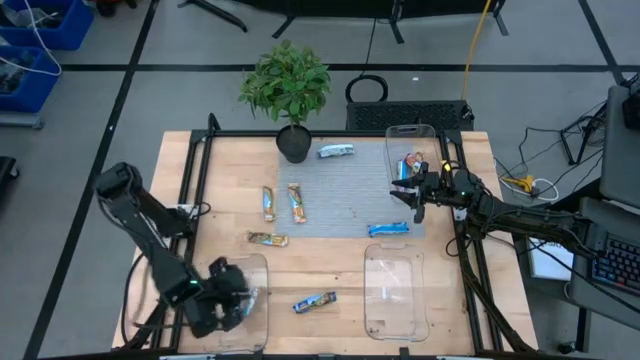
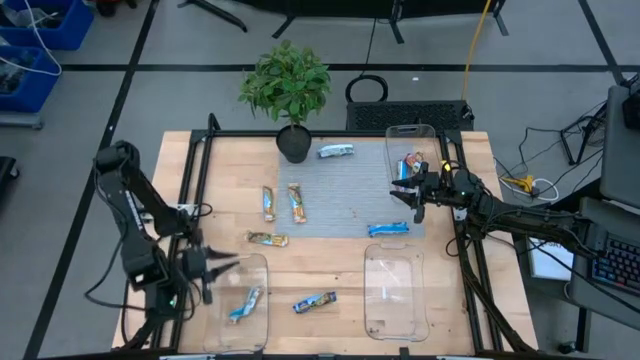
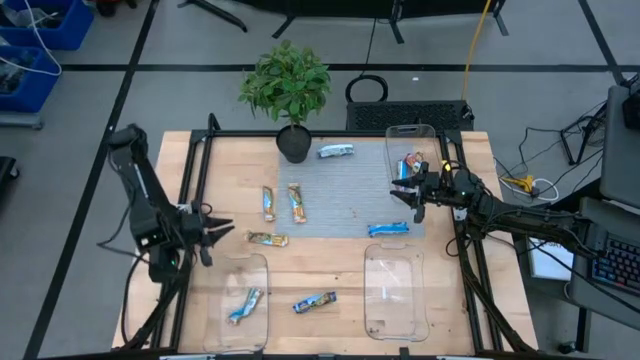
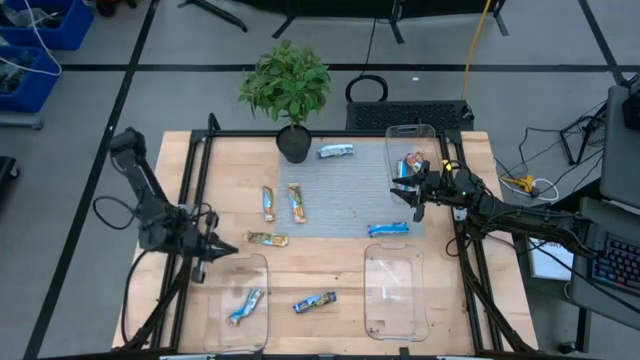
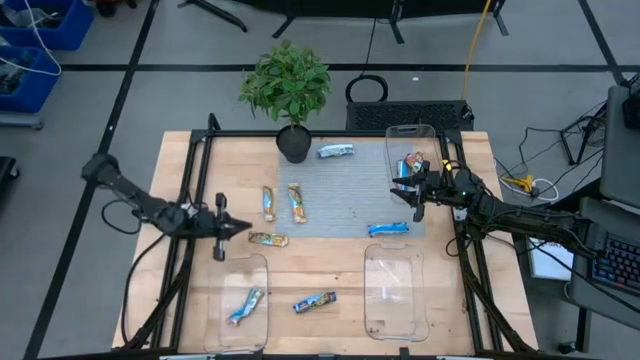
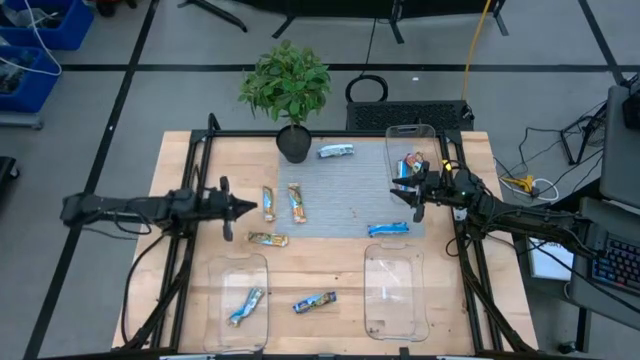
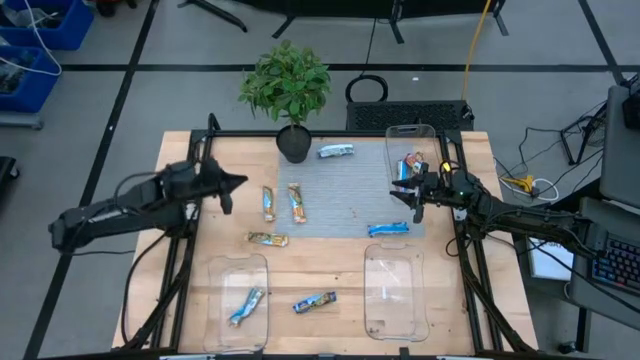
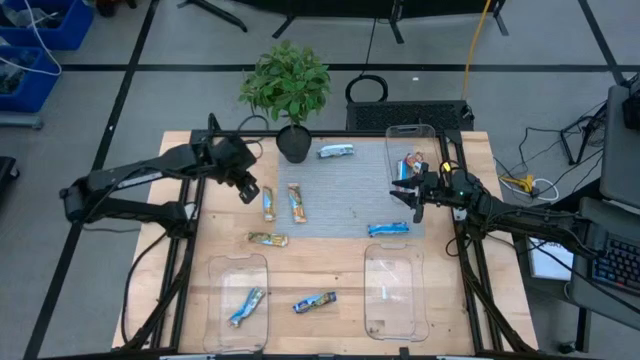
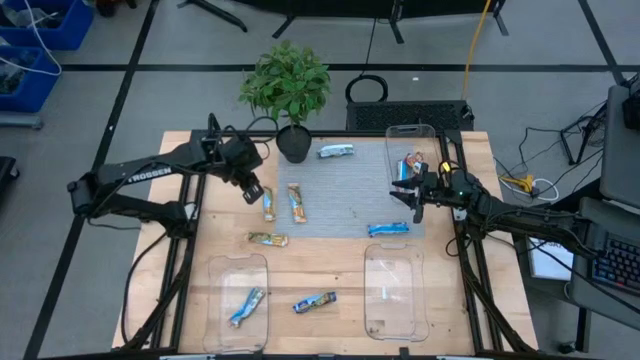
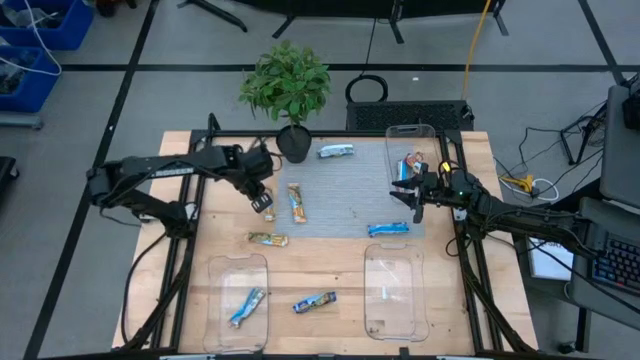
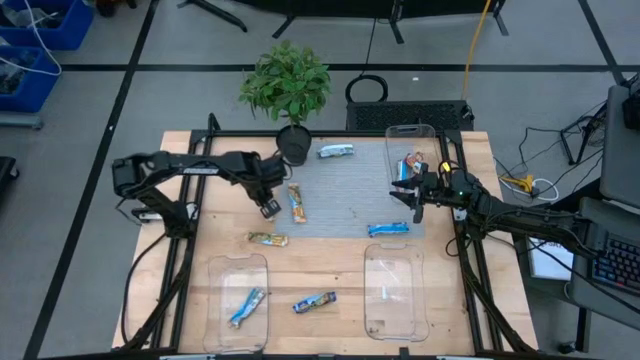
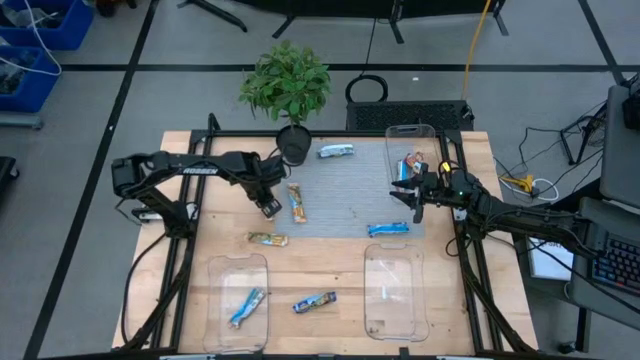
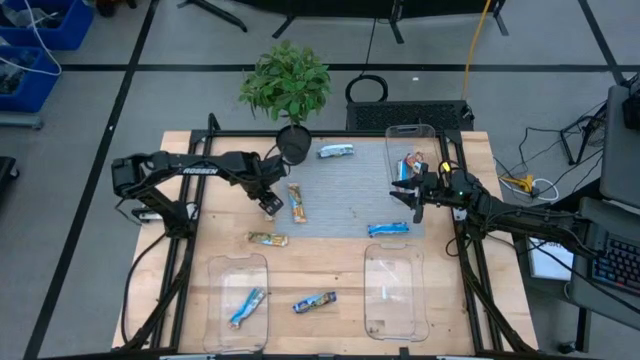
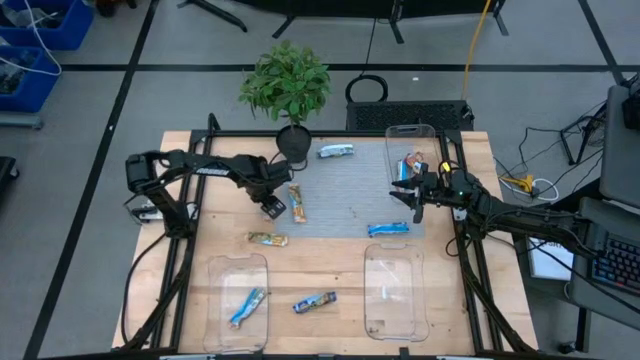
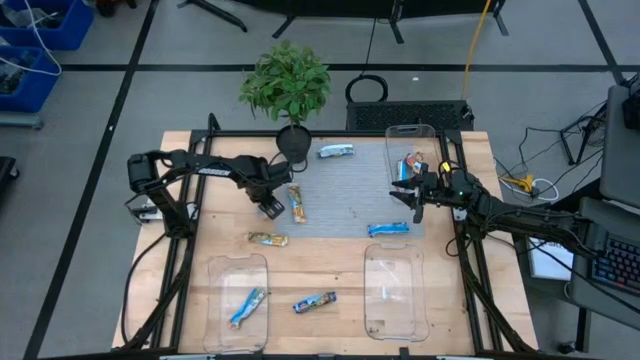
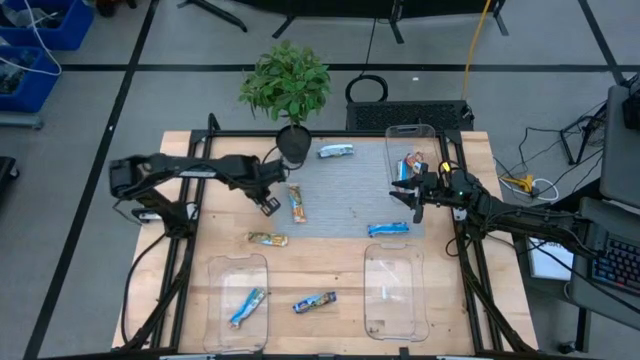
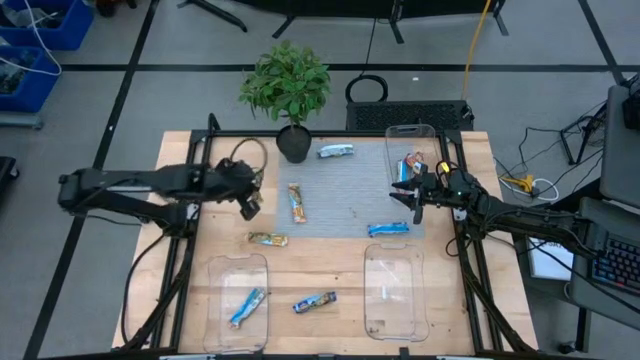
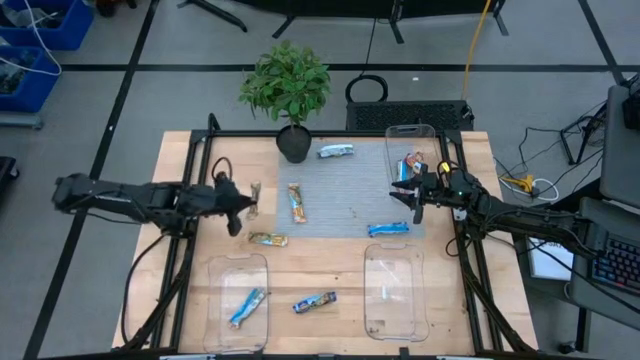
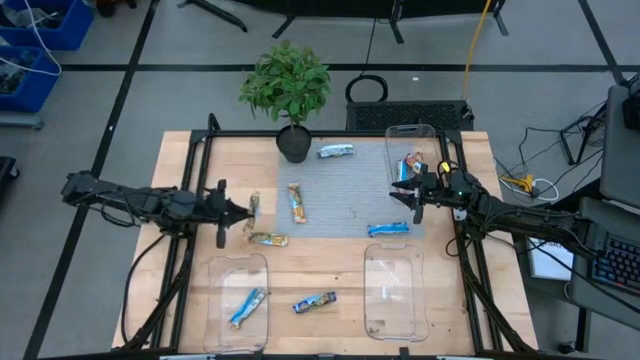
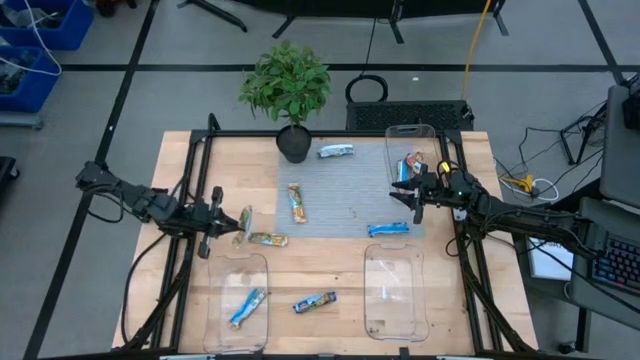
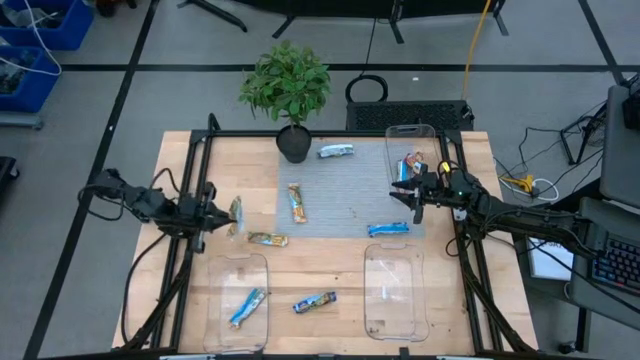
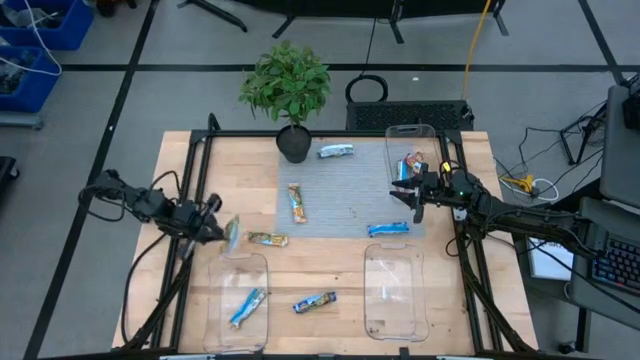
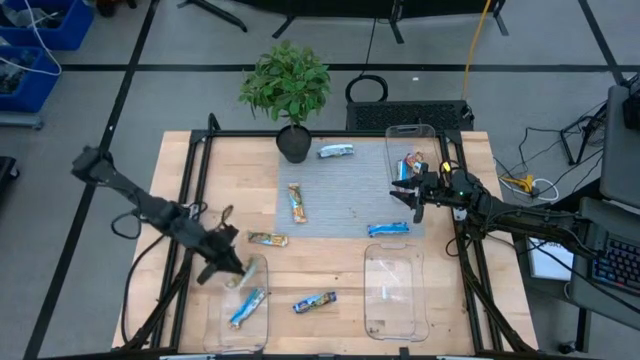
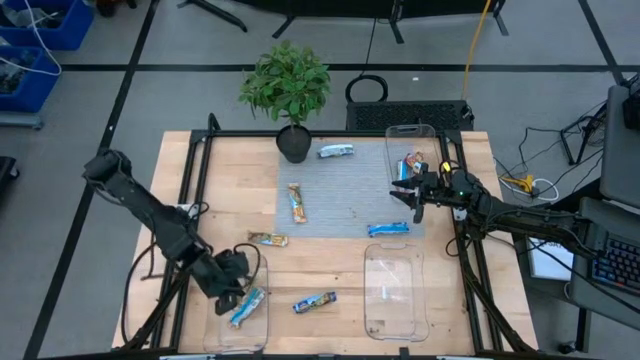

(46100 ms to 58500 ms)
Task: Pick and place Granola Bars by type
Put the yellow granola bar into the bottom left transparent bin

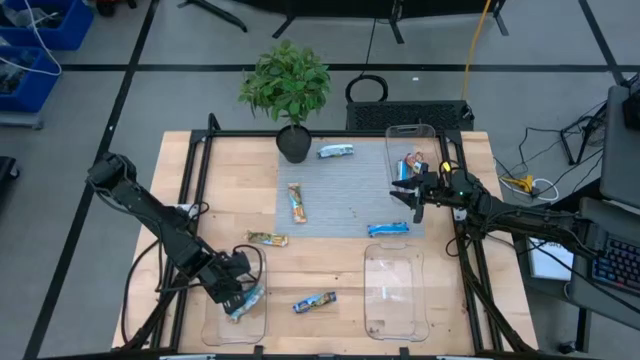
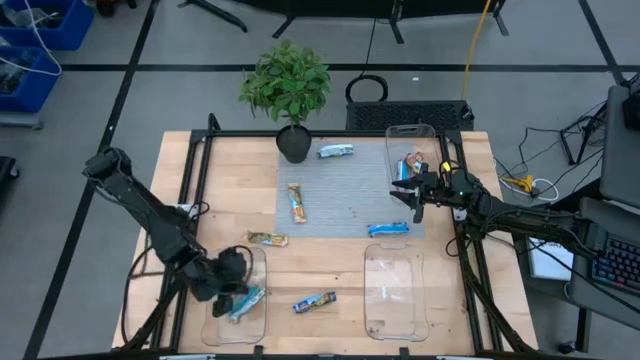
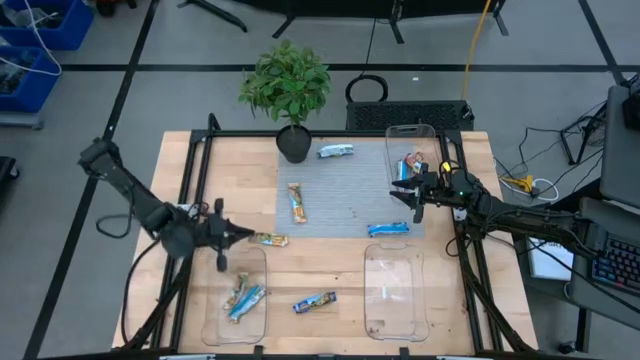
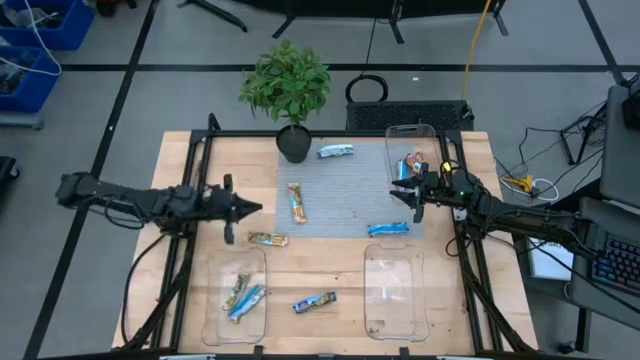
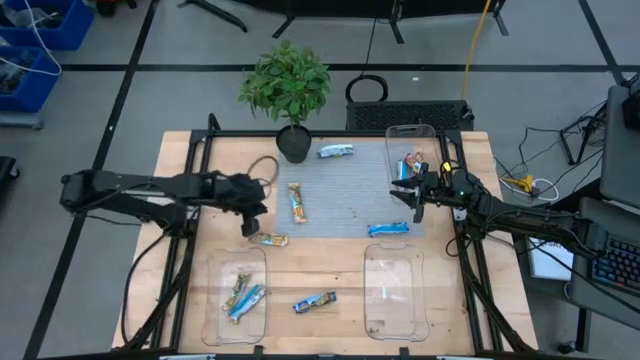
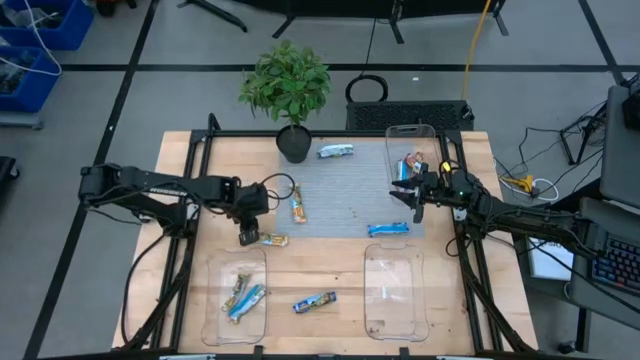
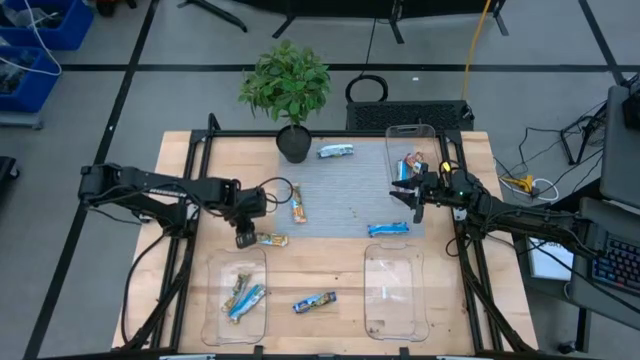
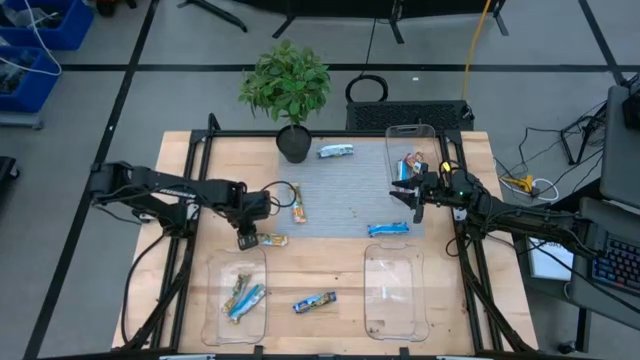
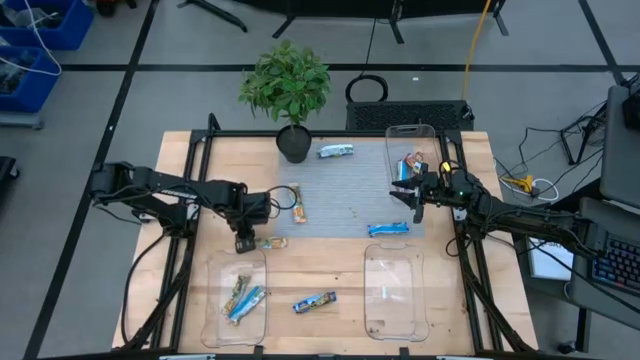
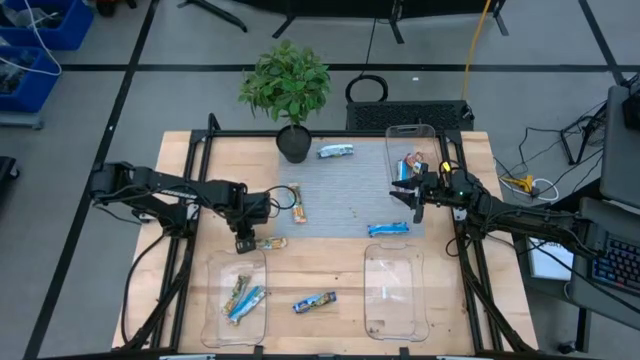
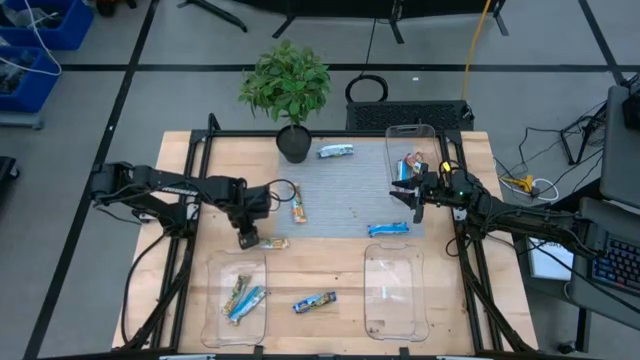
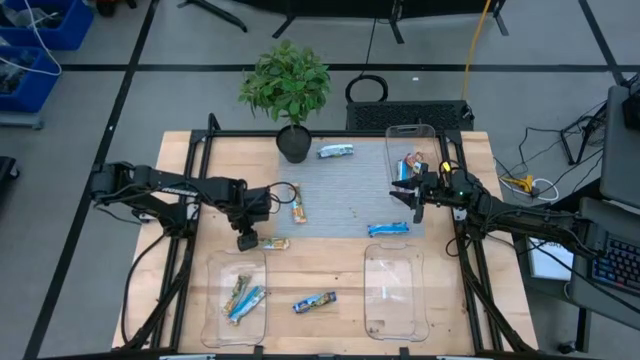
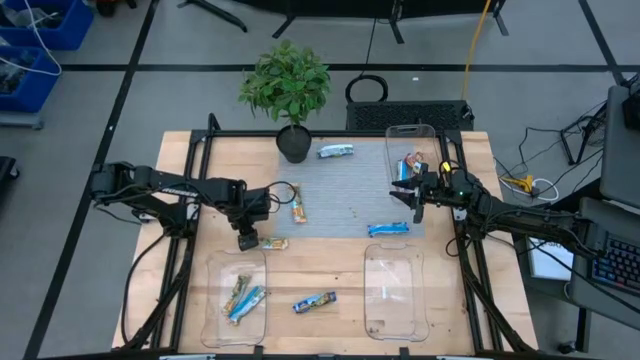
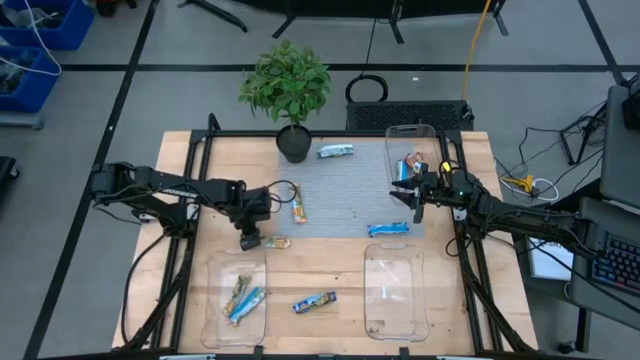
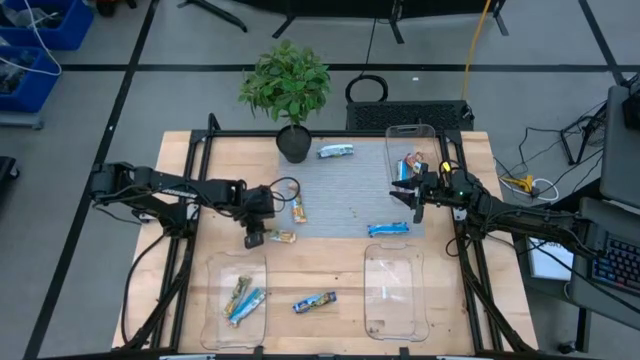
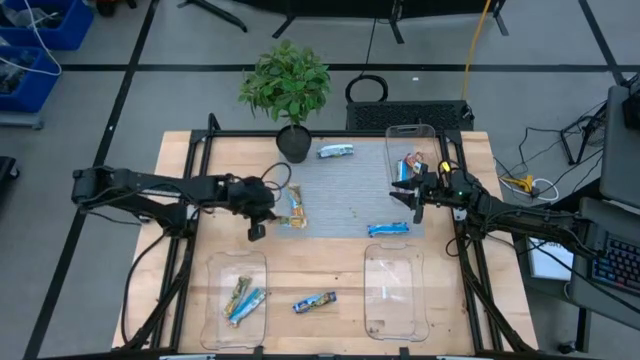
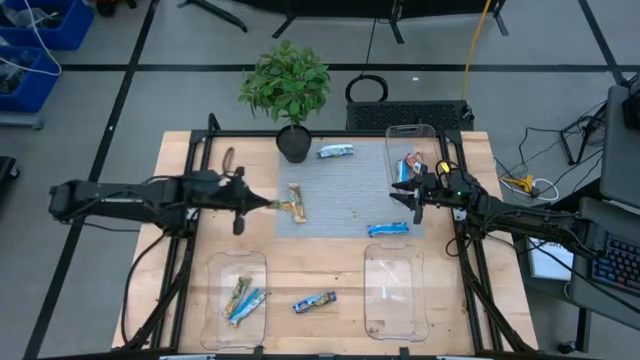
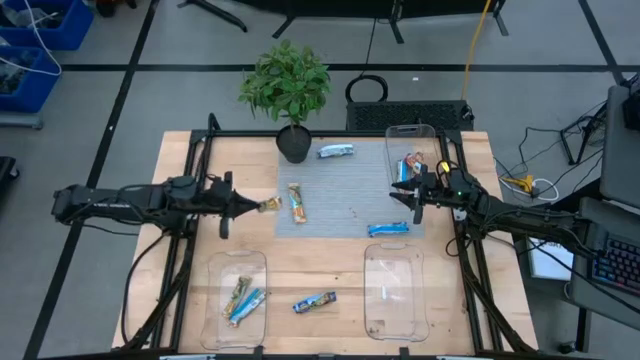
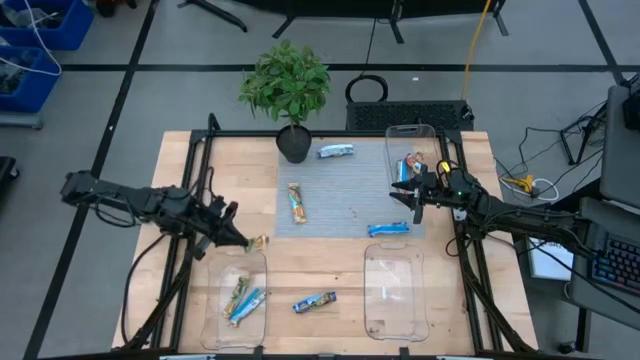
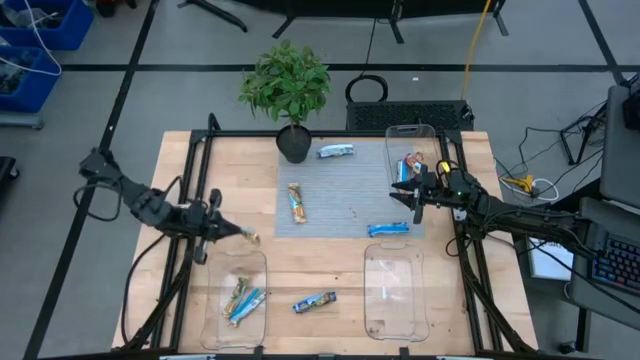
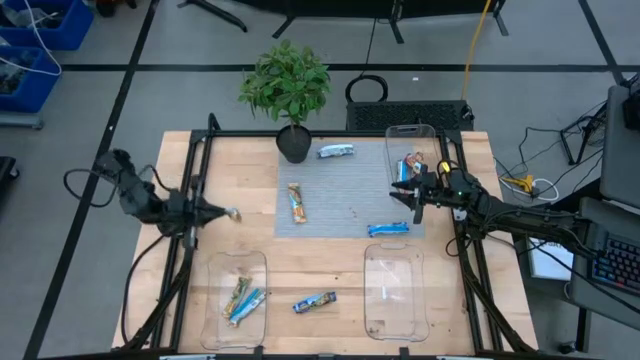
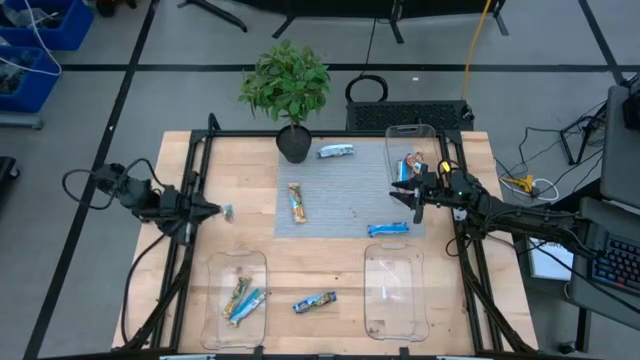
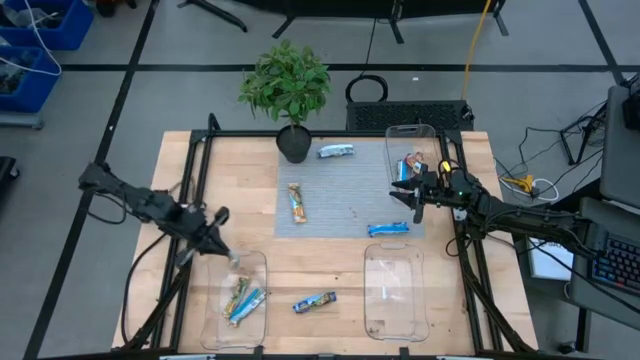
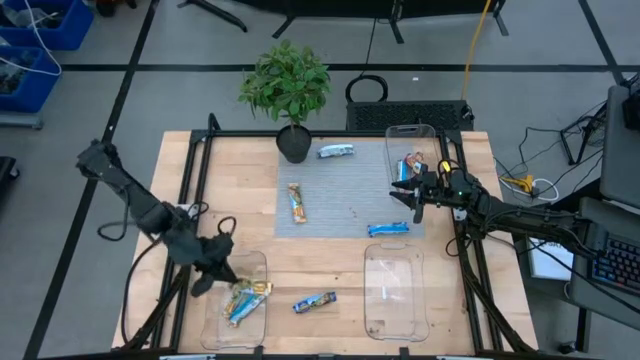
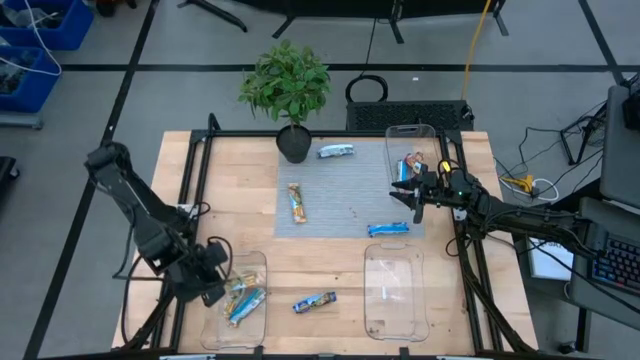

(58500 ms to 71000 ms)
Put the yellow granola bar into the bottom left transparent bin
